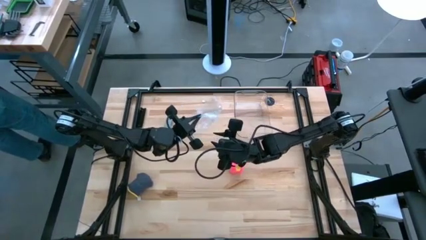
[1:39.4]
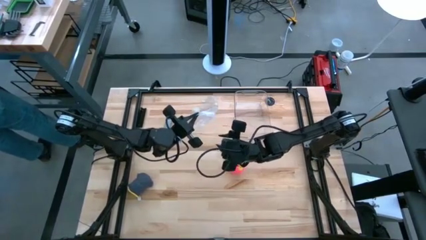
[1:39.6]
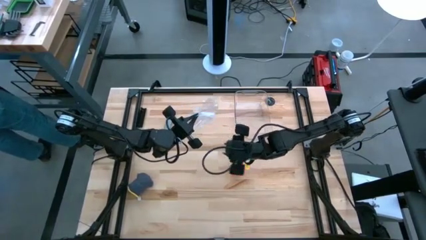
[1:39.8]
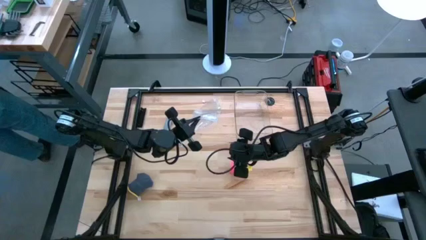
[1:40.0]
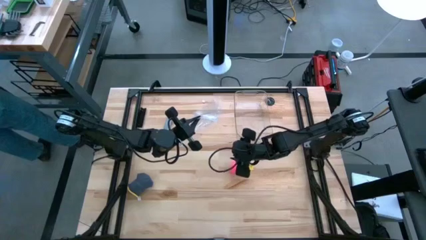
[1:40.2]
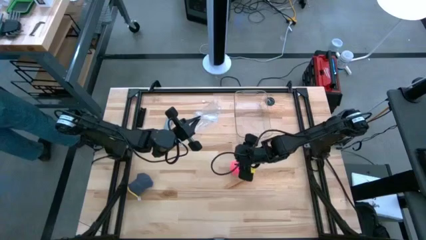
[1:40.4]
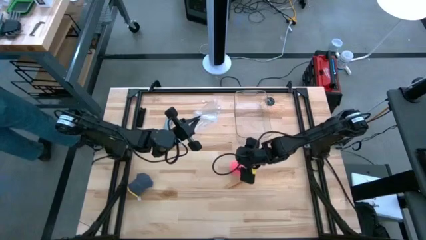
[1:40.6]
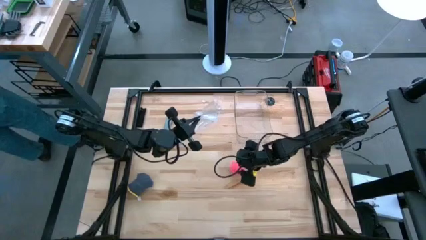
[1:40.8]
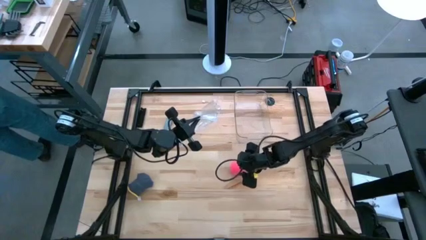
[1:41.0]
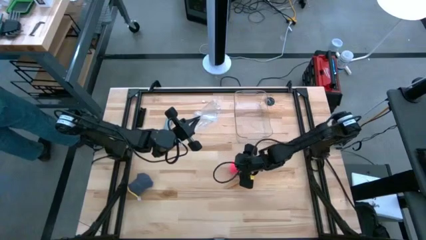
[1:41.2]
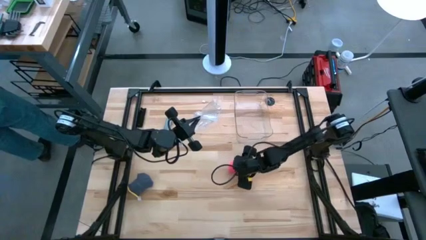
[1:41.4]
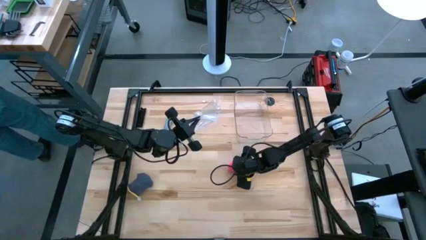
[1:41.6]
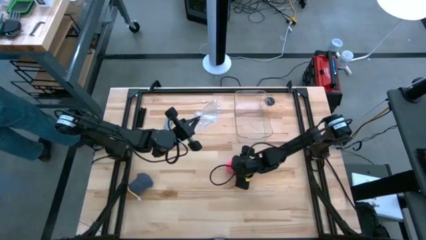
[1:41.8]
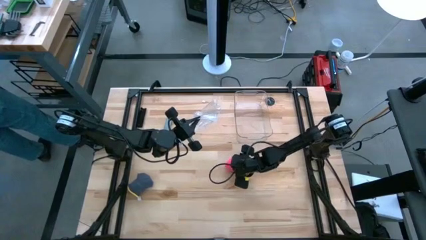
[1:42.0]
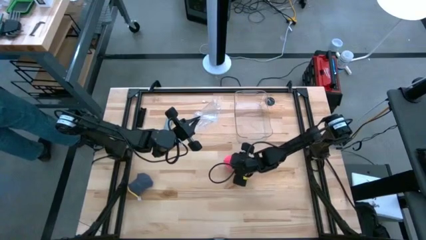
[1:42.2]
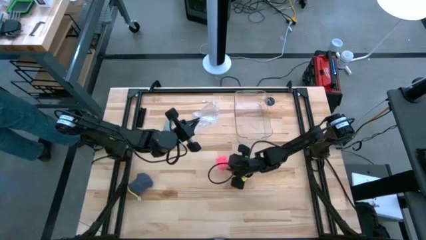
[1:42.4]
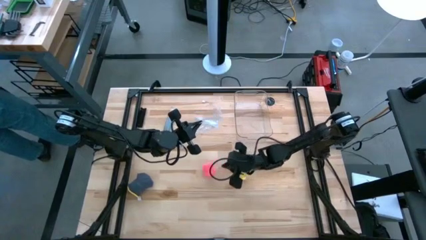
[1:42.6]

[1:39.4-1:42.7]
Task: Roll bandage
Put the pink bandage into the transparent zip bag

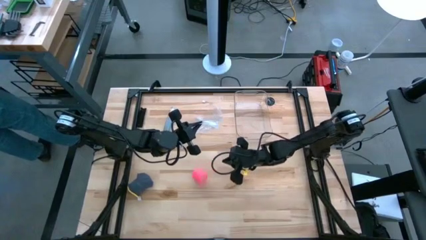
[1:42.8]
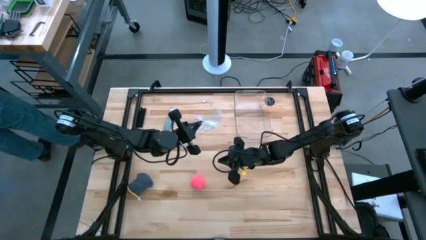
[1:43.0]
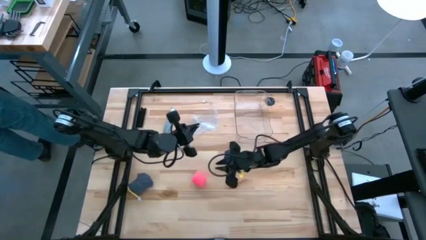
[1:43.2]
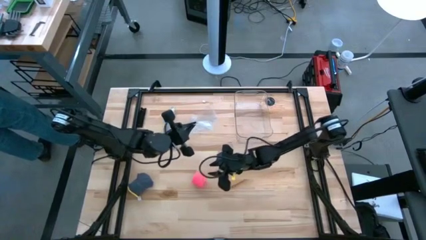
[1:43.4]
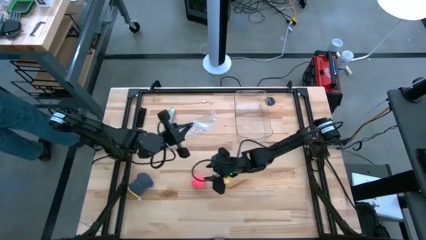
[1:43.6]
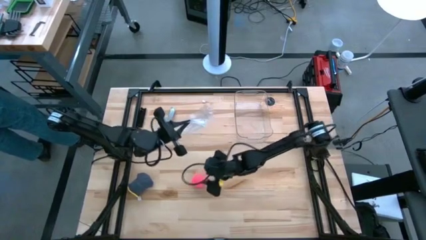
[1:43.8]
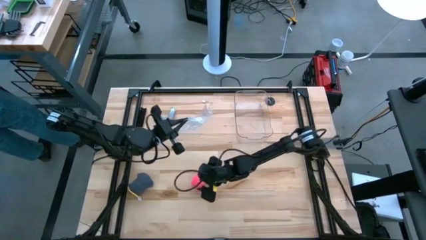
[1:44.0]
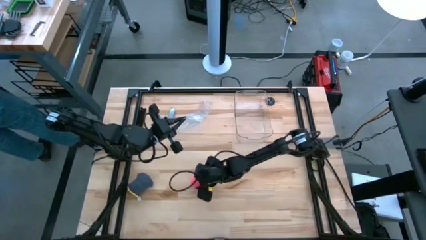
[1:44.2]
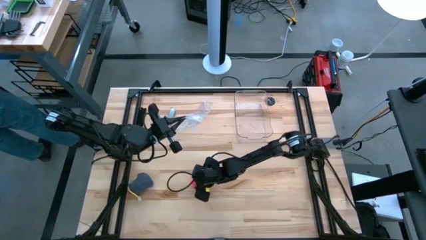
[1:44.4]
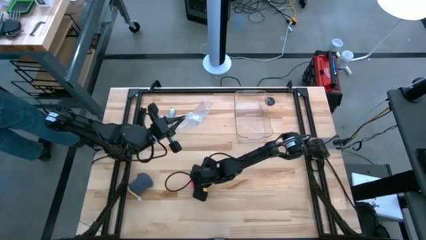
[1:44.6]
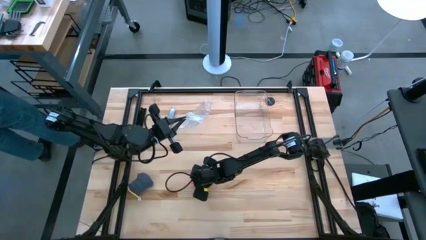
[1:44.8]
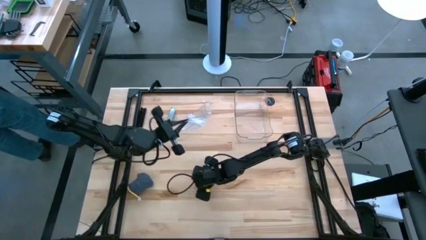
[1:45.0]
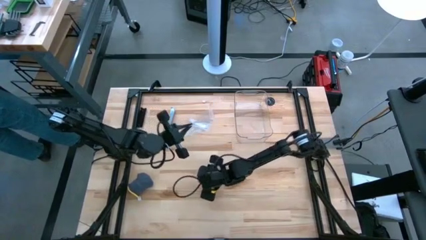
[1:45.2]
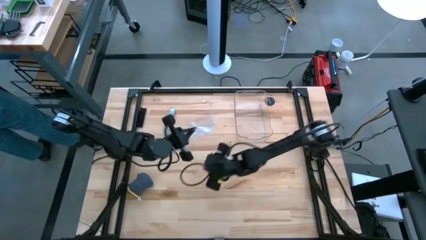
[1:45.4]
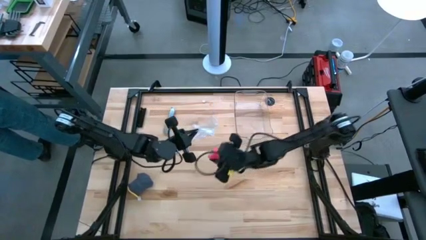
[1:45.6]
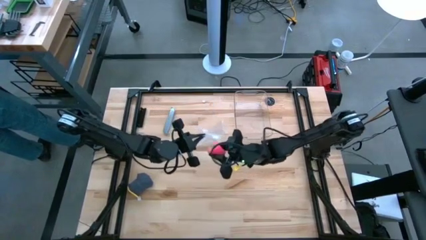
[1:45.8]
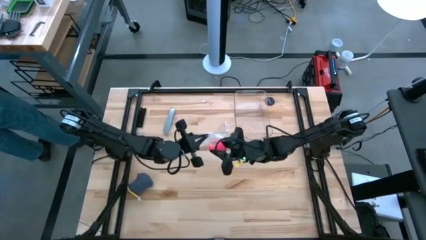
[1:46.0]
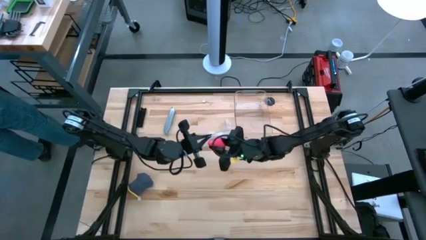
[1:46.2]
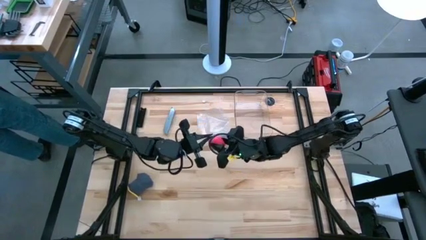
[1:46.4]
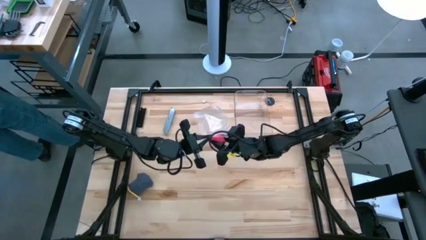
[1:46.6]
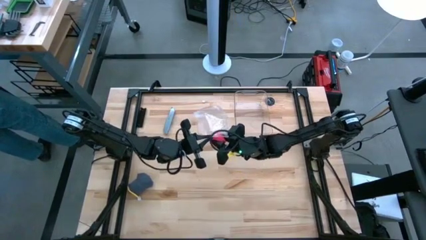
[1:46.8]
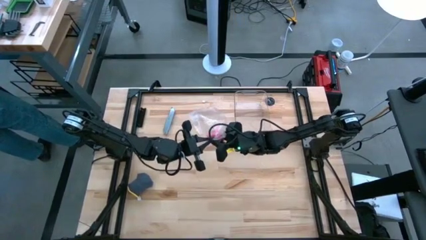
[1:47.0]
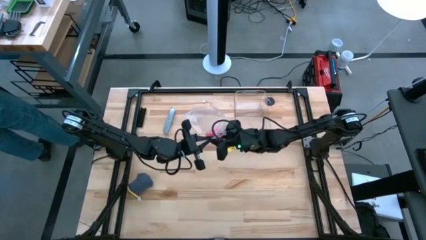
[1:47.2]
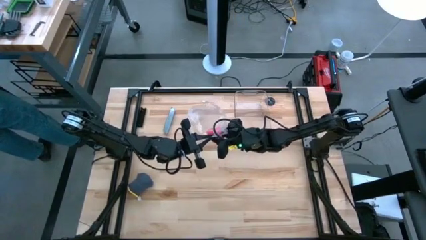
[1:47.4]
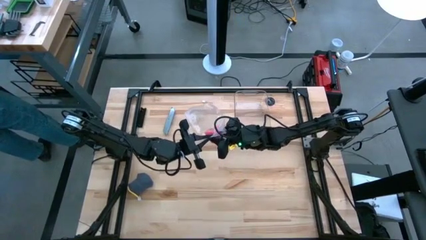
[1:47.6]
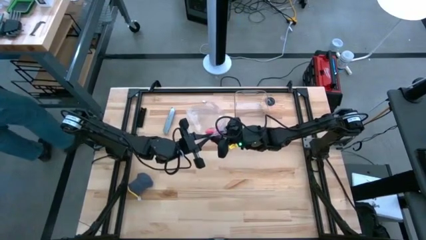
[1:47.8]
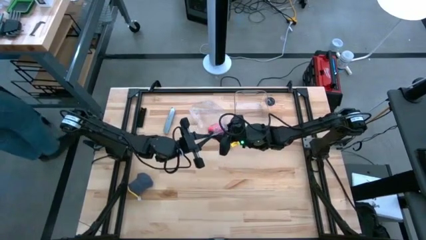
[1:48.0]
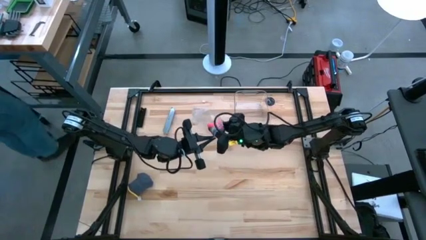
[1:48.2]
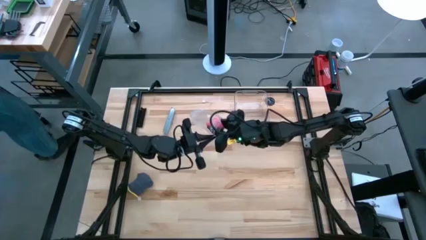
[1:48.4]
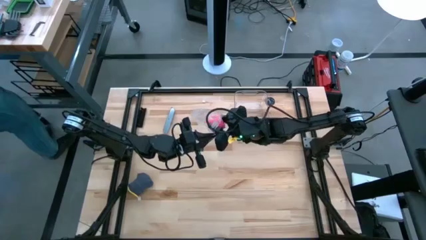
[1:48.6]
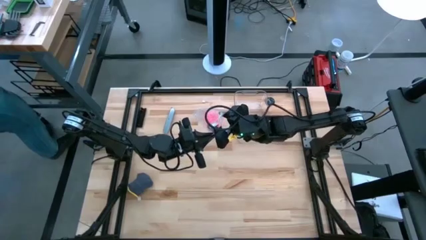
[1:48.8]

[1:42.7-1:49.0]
Put the pink bandage into the transparent zip bag

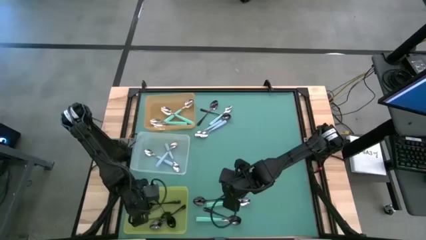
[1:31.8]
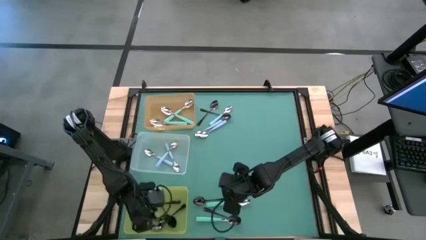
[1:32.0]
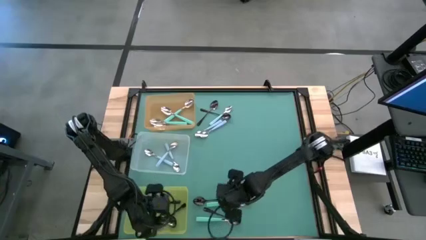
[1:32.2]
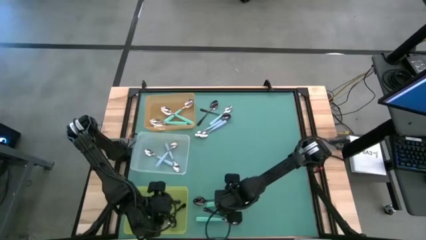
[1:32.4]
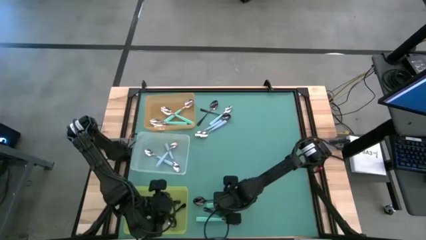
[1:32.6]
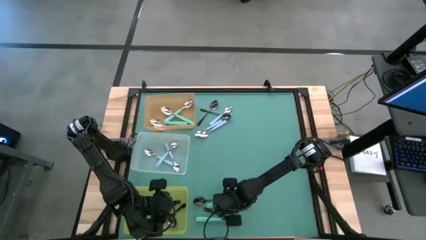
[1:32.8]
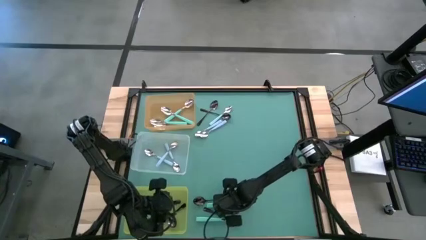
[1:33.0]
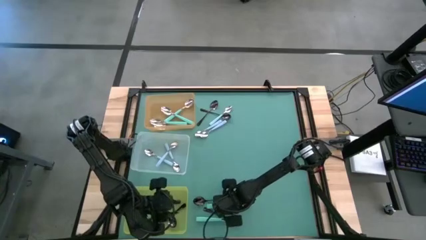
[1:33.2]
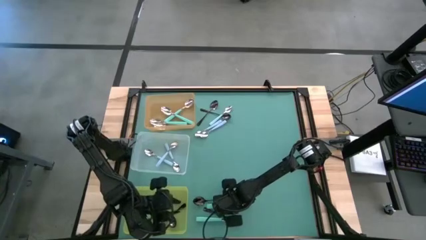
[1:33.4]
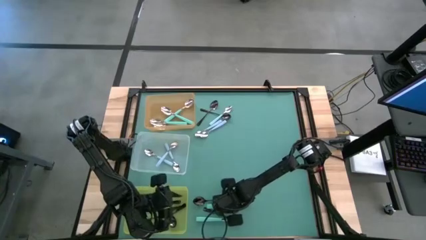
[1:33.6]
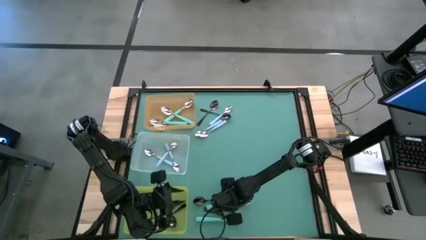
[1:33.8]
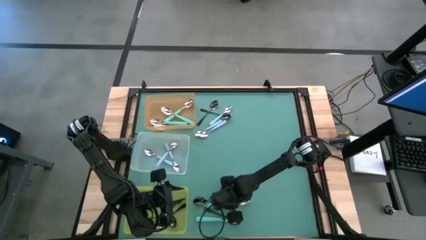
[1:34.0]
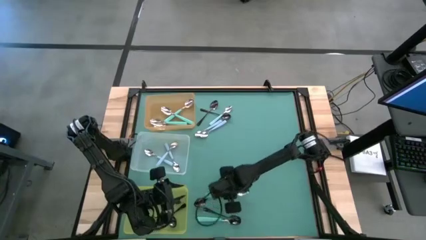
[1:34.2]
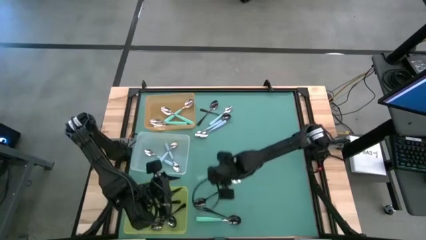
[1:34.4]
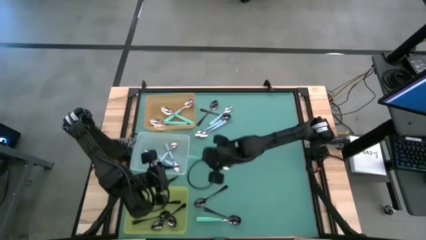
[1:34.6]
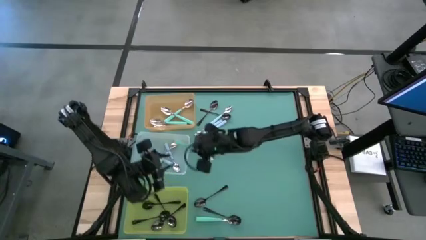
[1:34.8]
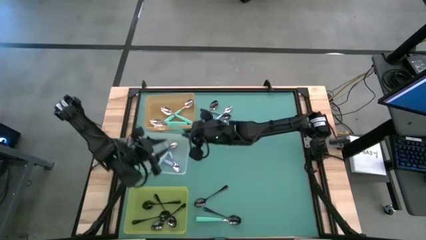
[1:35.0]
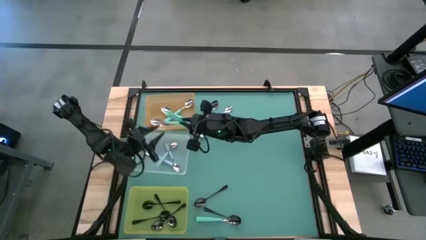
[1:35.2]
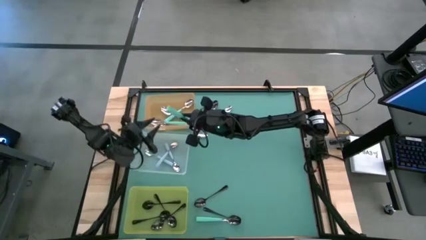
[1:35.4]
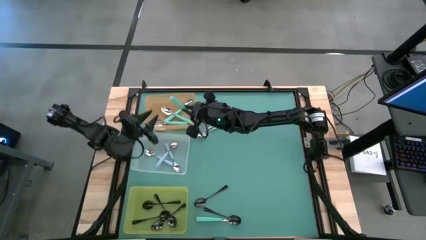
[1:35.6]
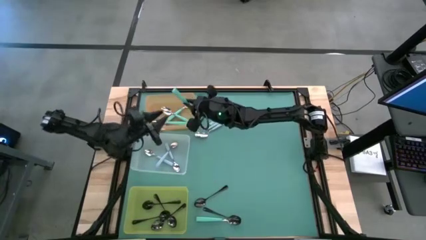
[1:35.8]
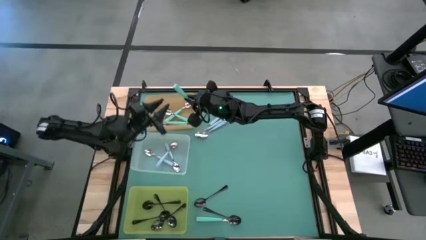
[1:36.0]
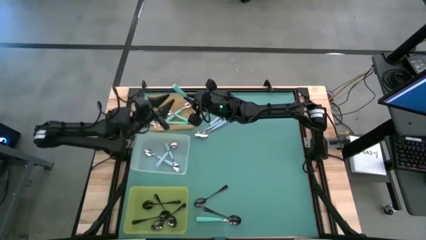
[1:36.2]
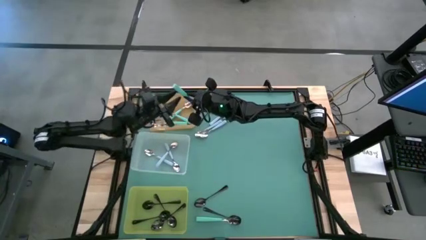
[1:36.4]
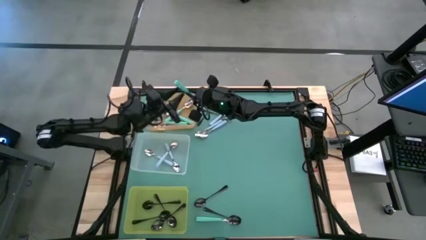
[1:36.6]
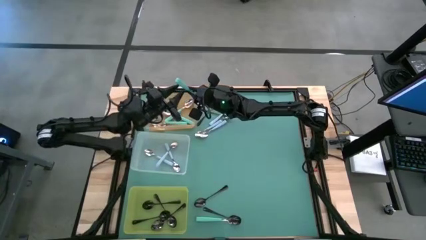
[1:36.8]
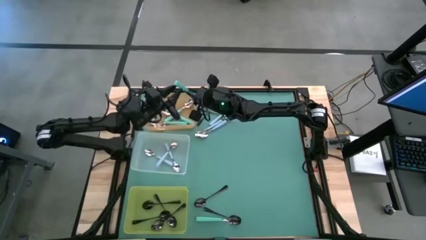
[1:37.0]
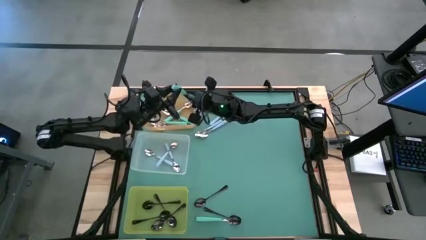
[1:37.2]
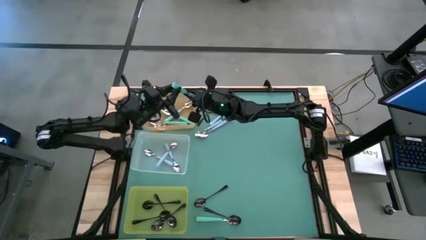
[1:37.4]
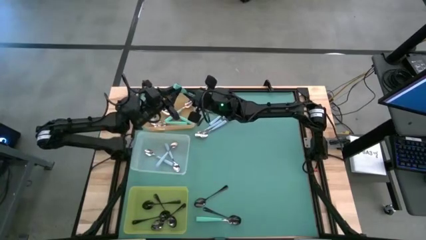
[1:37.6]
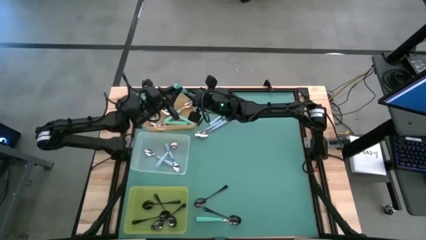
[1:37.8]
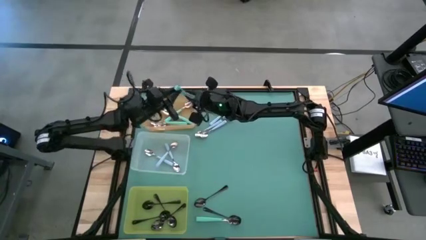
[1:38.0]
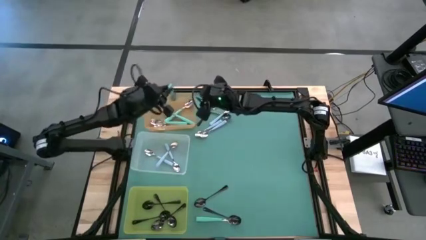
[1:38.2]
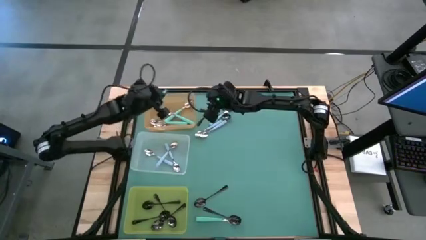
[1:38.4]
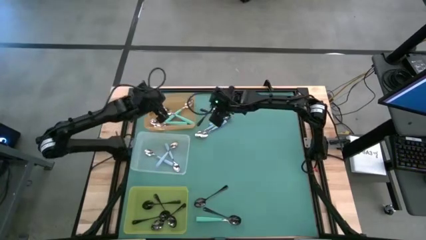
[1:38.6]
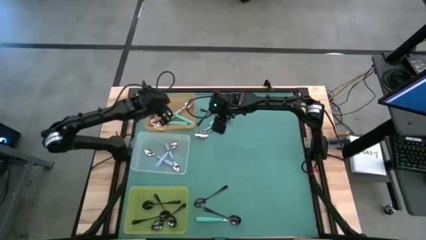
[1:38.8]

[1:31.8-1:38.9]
Task: Sort silverware by color (type)
Put the green spoon into the orange bin
